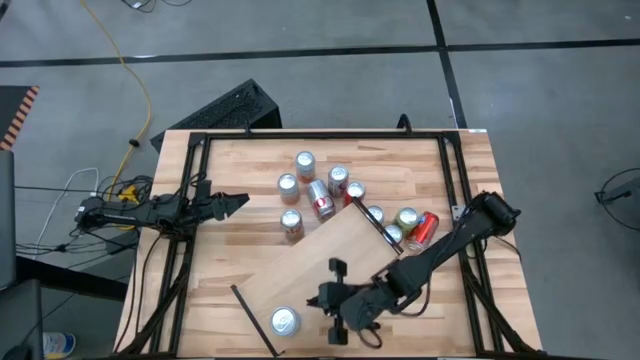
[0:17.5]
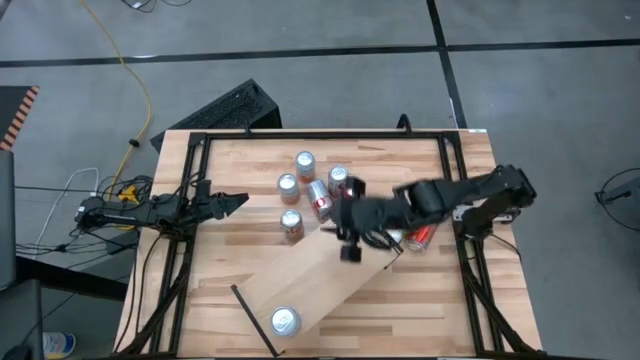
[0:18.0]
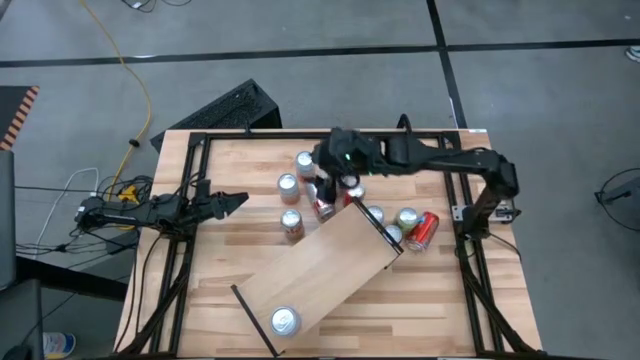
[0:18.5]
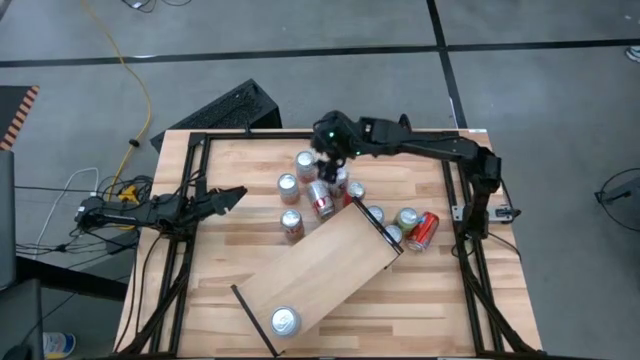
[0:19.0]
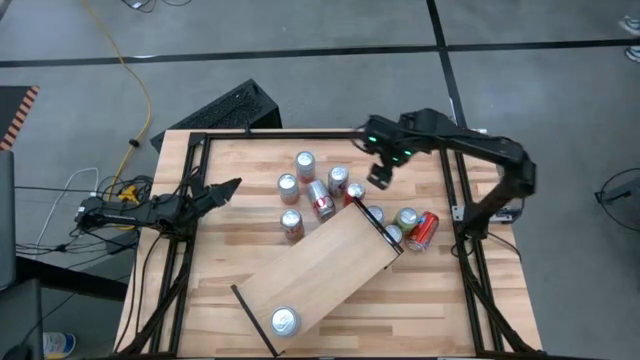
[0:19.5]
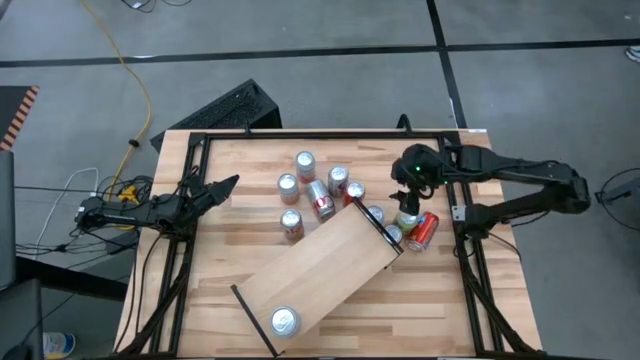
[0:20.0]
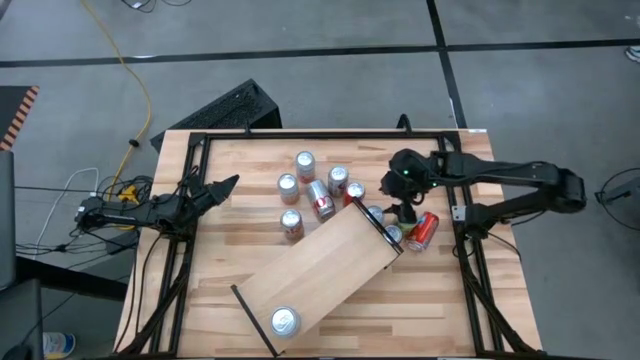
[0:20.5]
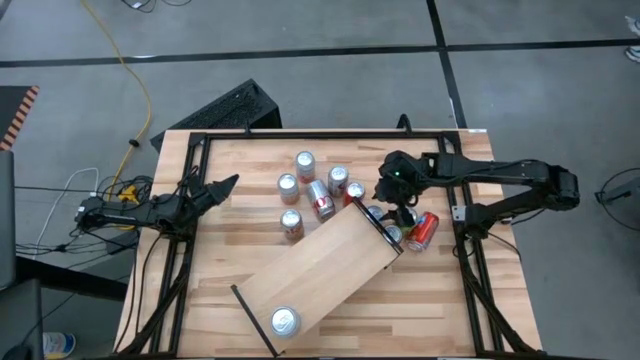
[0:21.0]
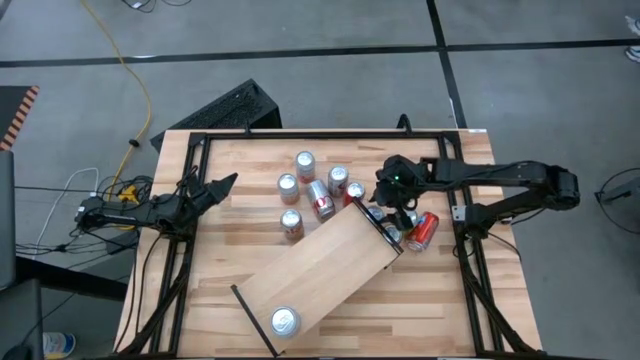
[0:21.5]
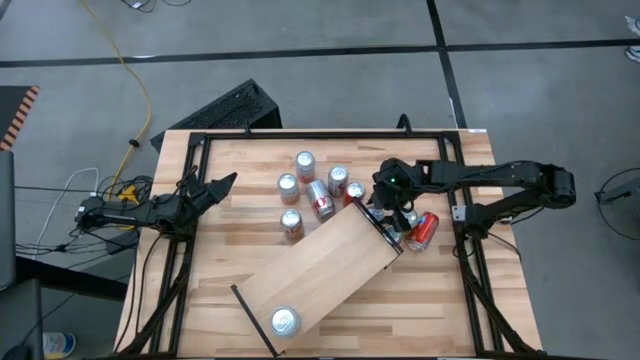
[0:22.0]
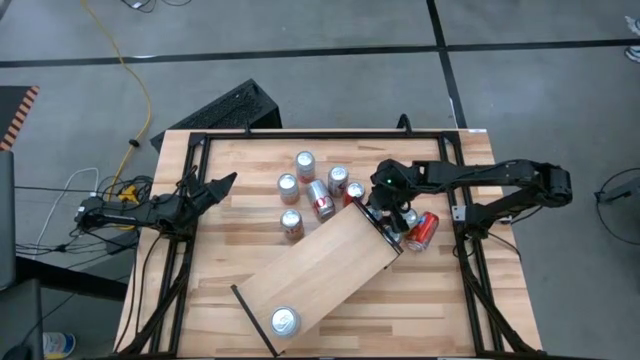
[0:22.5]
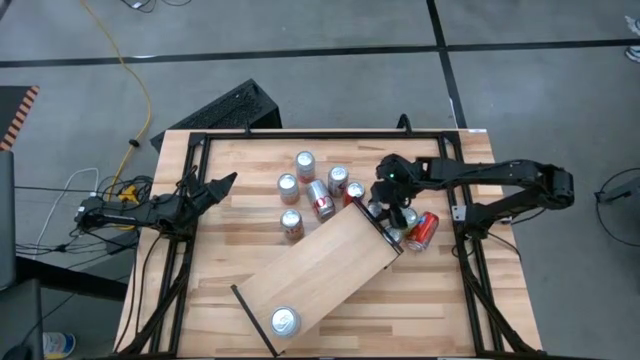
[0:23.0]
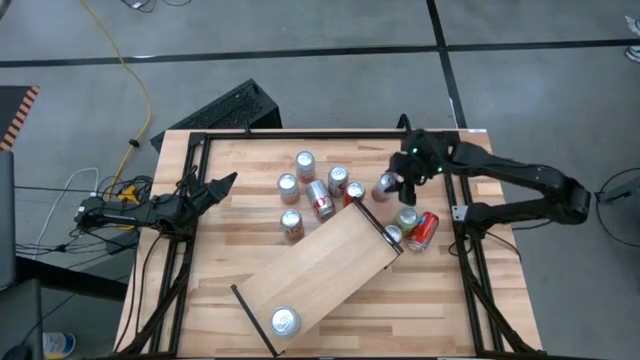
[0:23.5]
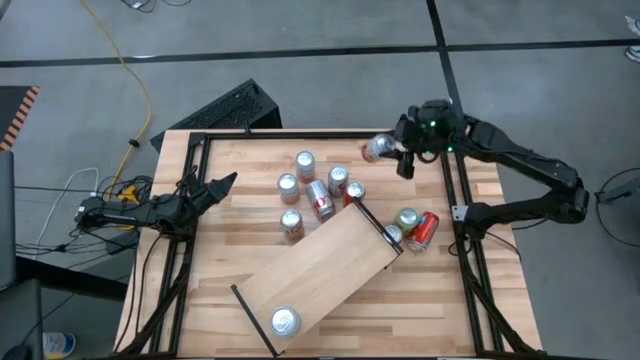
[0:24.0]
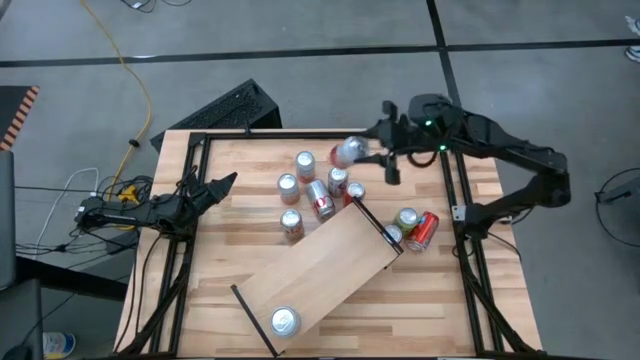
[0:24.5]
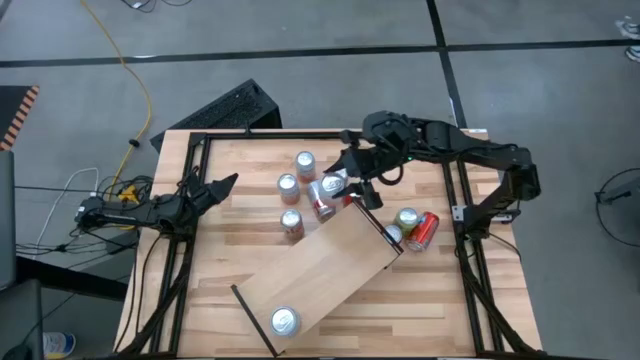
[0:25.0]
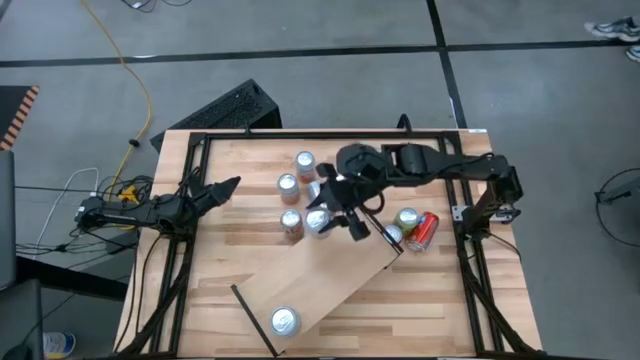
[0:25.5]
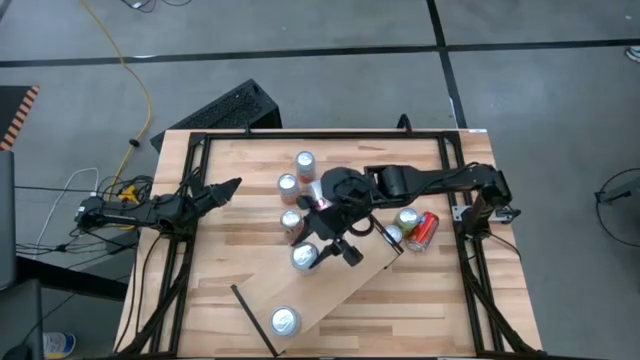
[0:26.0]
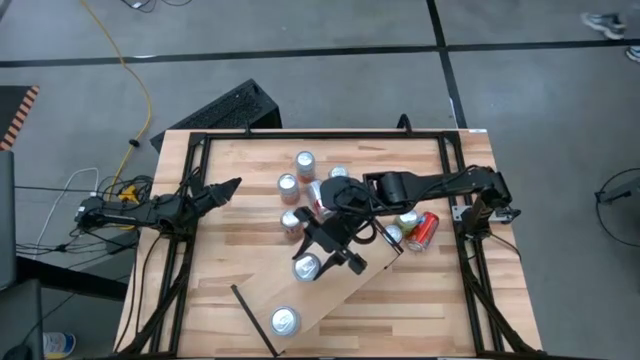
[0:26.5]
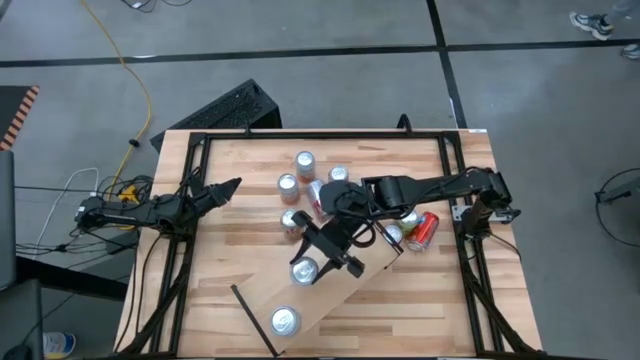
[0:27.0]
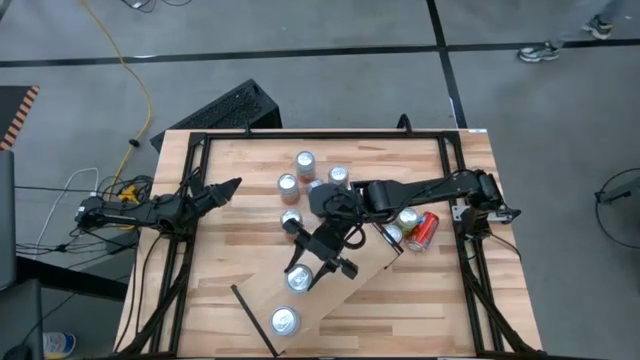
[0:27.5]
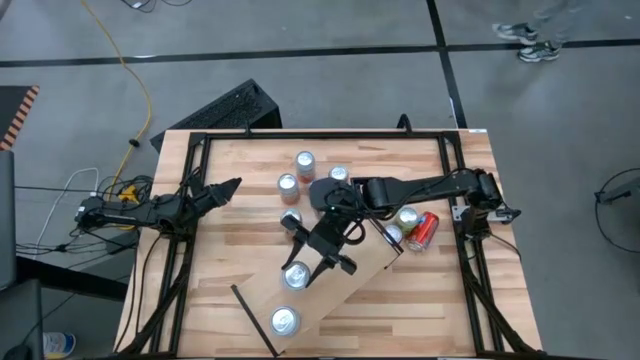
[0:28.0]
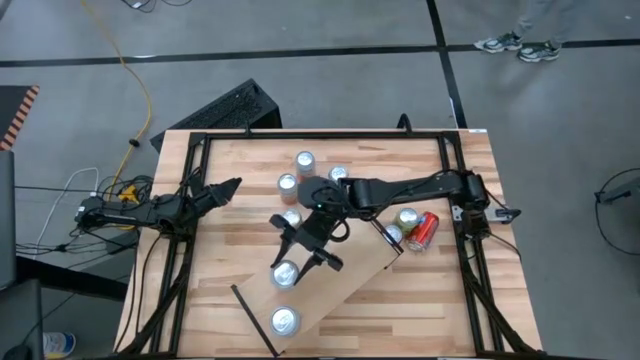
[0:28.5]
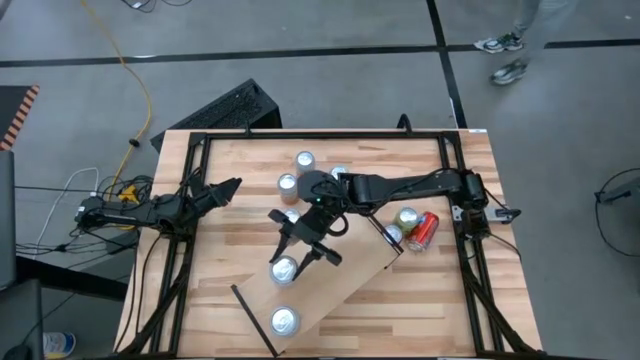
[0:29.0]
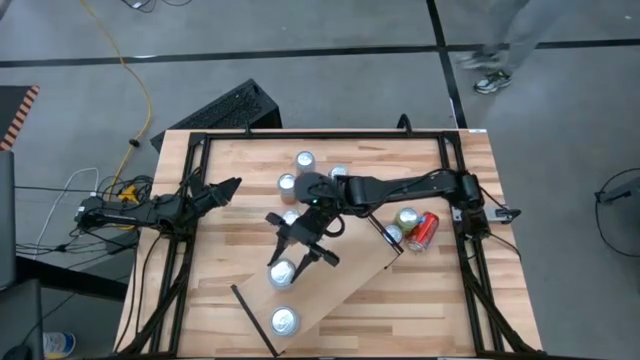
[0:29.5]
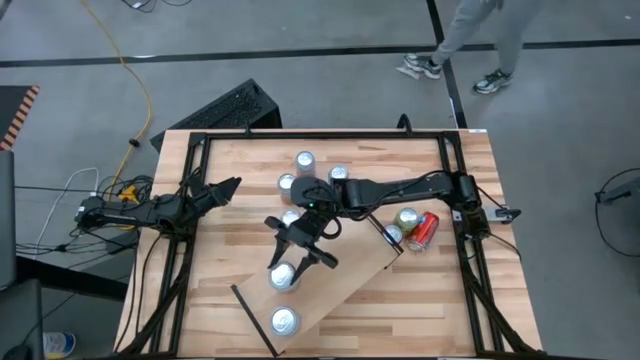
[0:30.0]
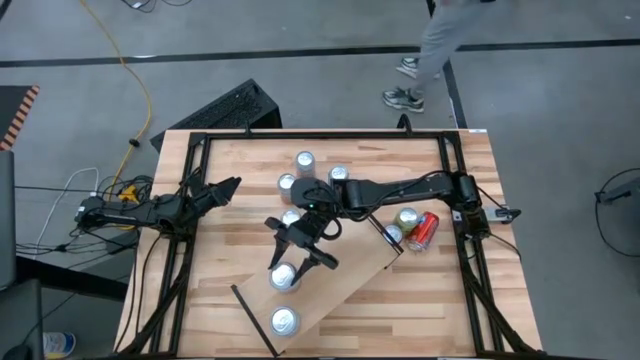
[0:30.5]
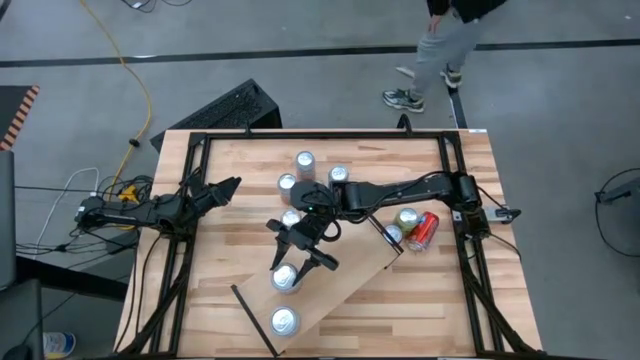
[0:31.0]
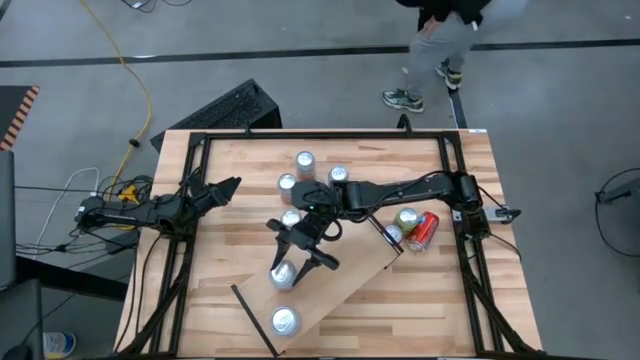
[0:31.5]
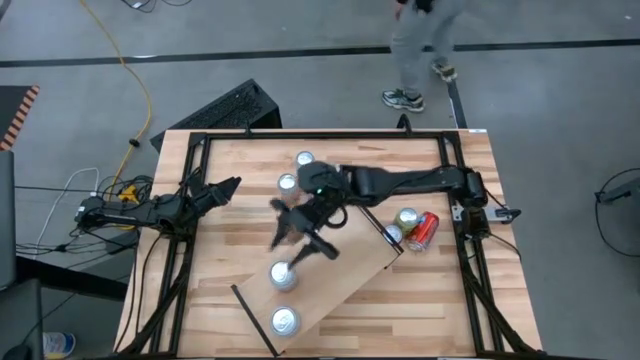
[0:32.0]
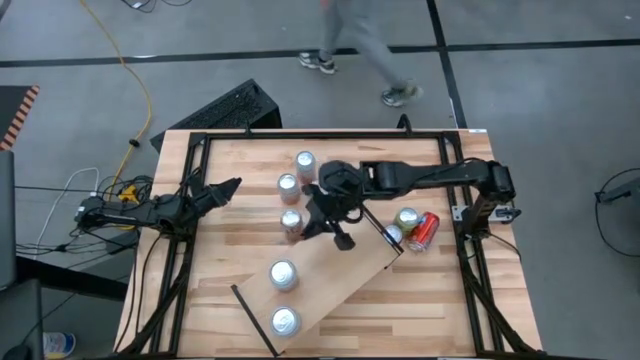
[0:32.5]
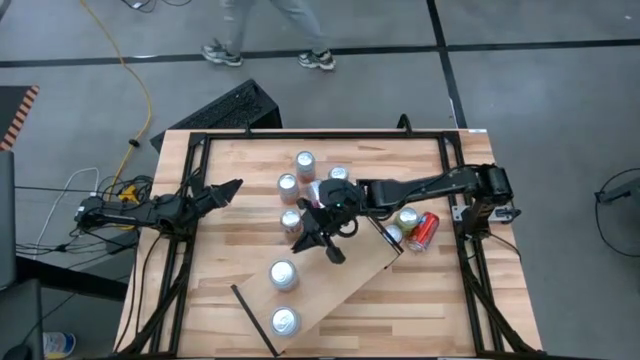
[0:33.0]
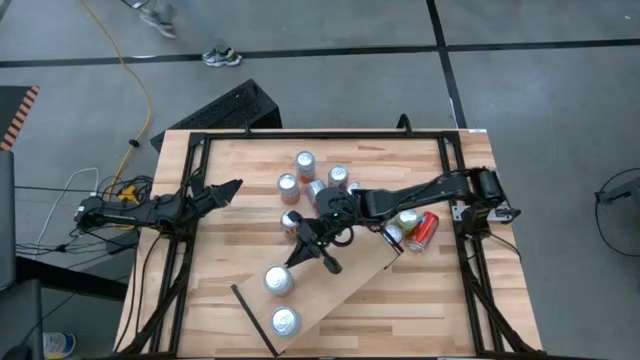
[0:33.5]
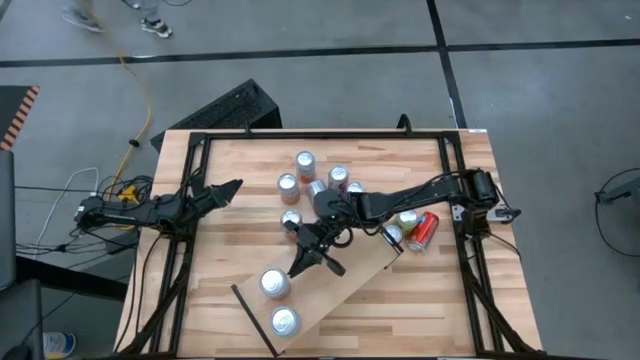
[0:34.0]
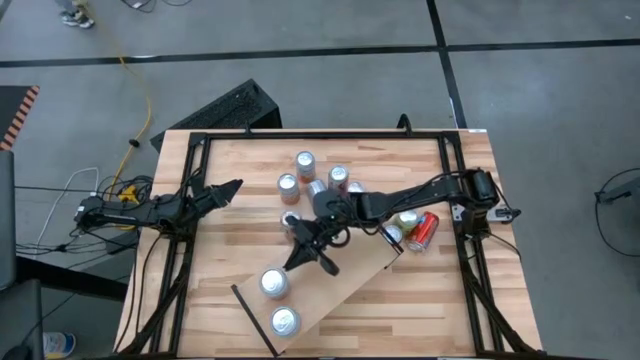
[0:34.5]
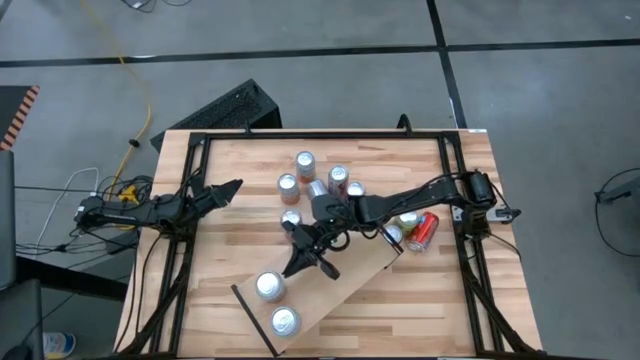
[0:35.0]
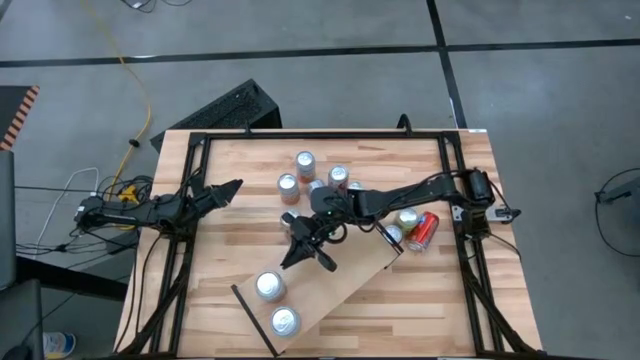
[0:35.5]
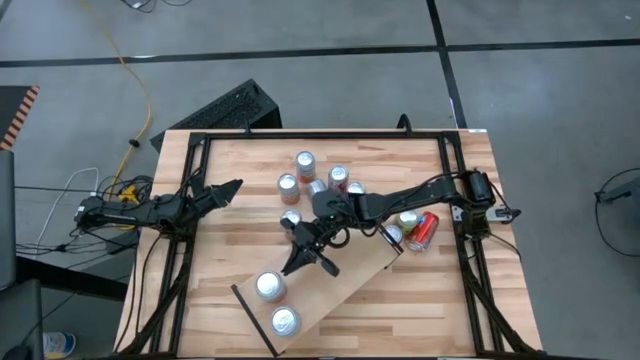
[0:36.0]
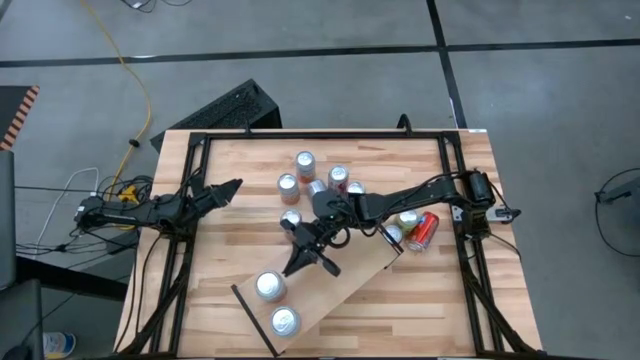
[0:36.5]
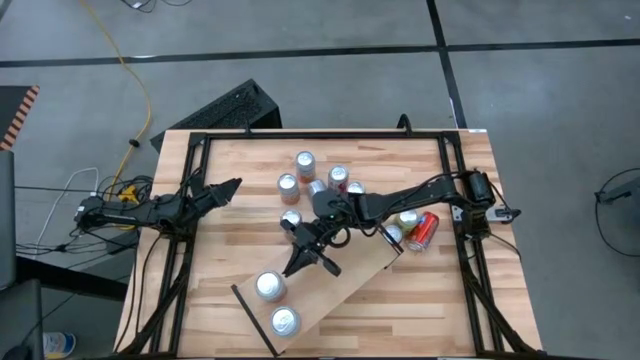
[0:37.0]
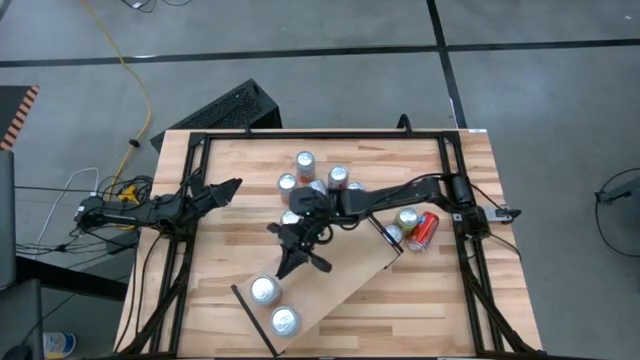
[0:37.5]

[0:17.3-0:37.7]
Task: Place canned beverage on shelf
Put the pink white soda can on the shelf aligned with the other pink white soda can
